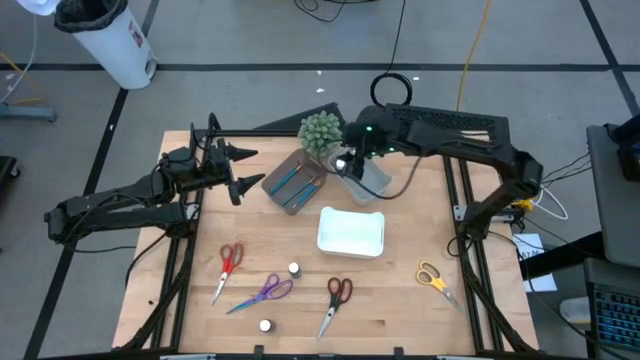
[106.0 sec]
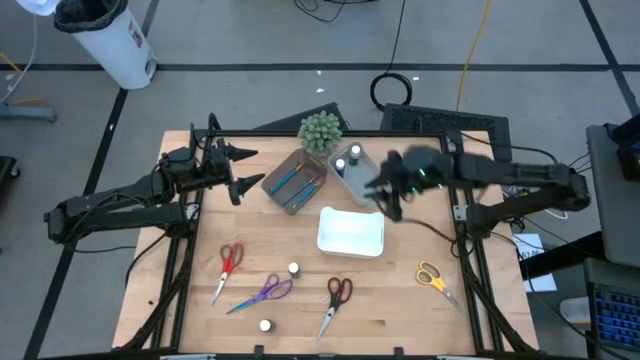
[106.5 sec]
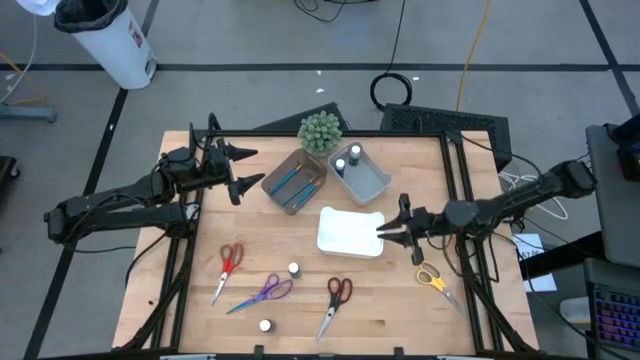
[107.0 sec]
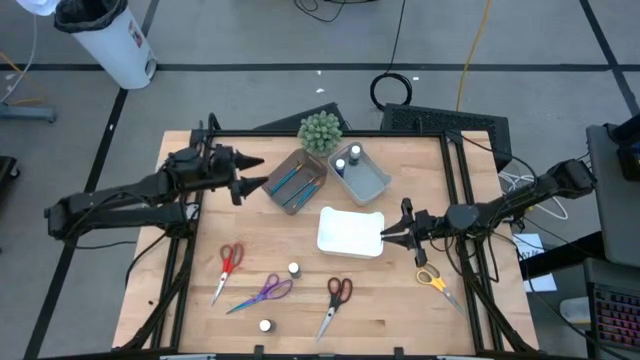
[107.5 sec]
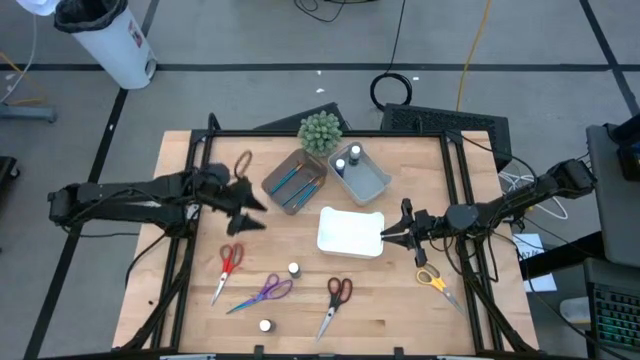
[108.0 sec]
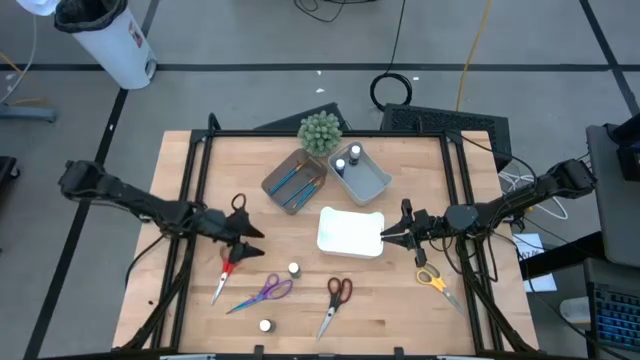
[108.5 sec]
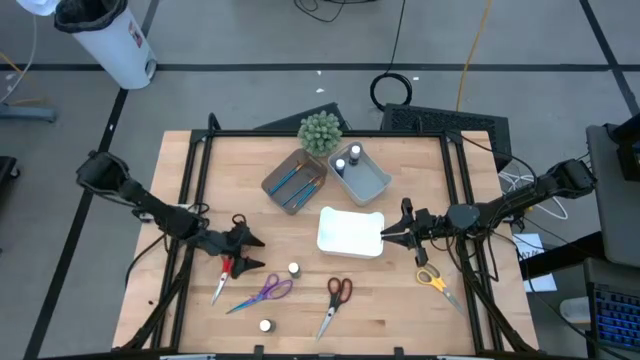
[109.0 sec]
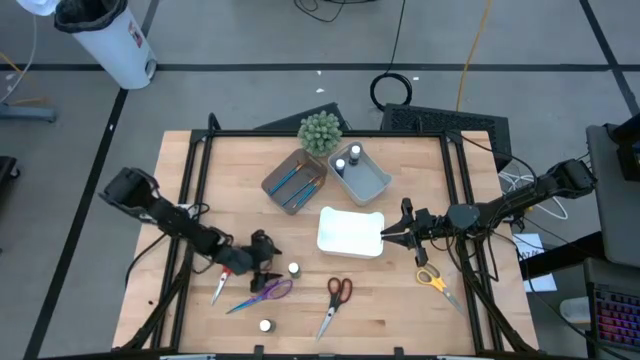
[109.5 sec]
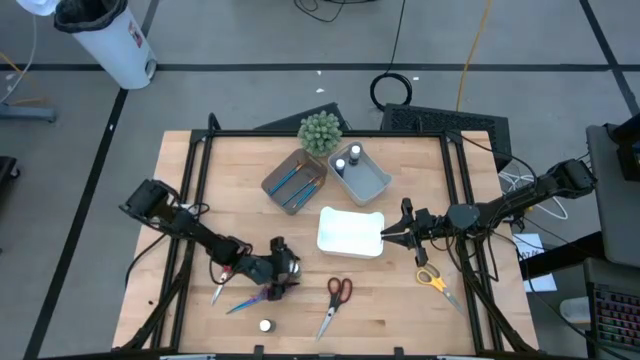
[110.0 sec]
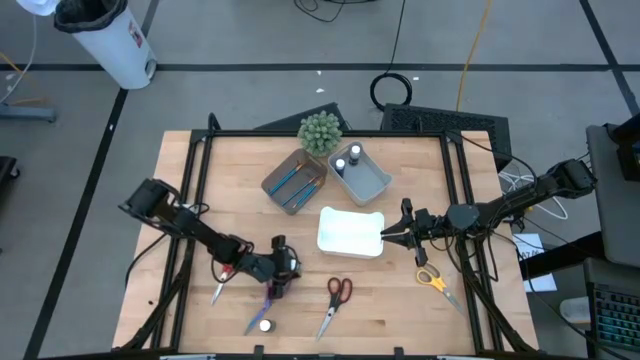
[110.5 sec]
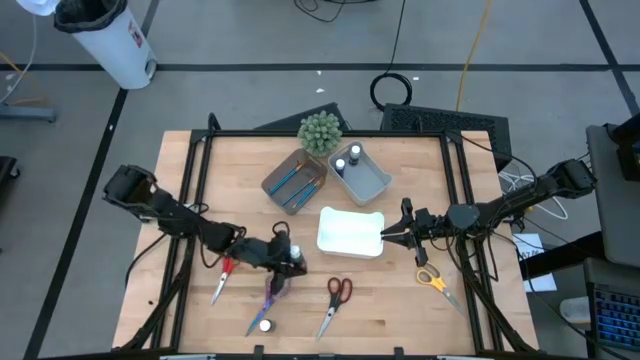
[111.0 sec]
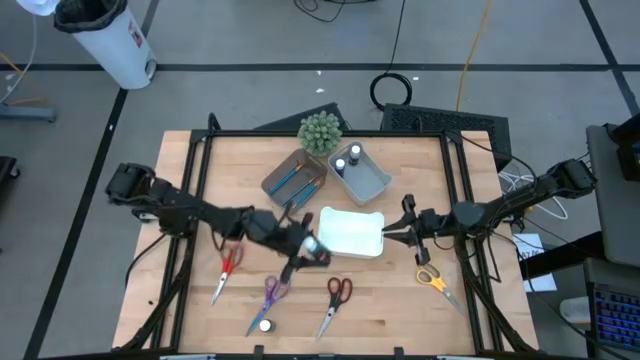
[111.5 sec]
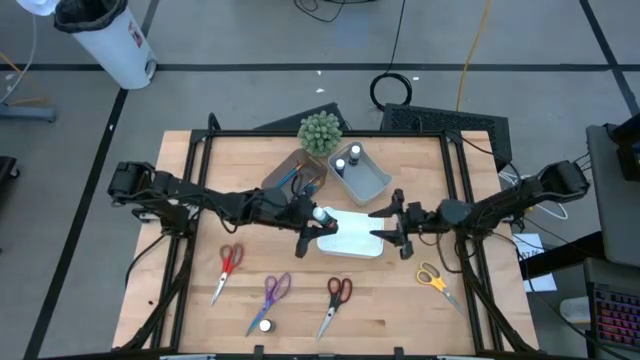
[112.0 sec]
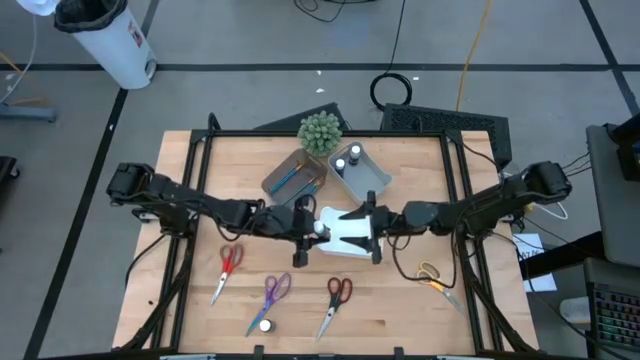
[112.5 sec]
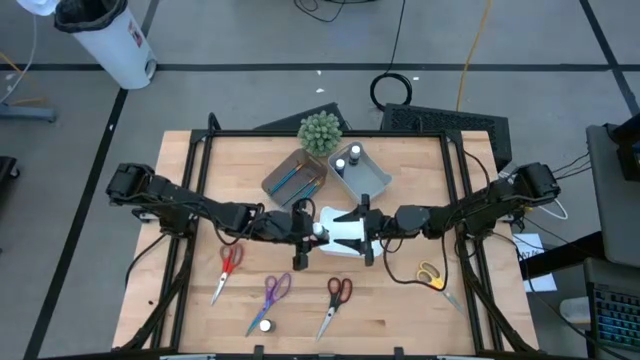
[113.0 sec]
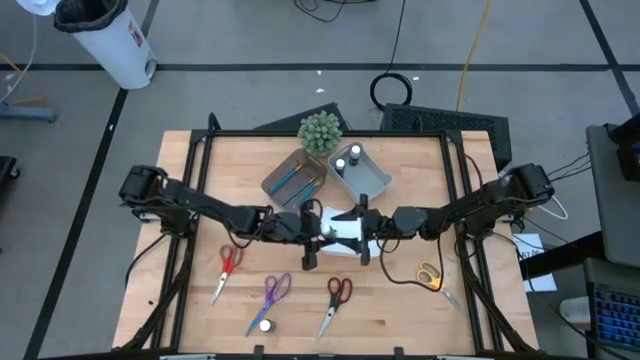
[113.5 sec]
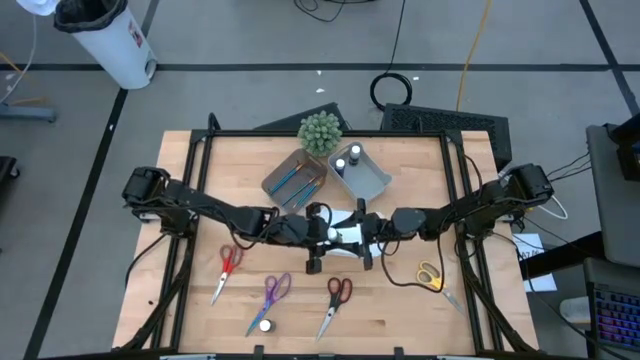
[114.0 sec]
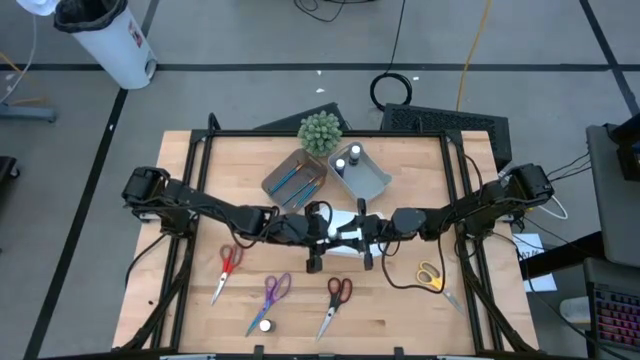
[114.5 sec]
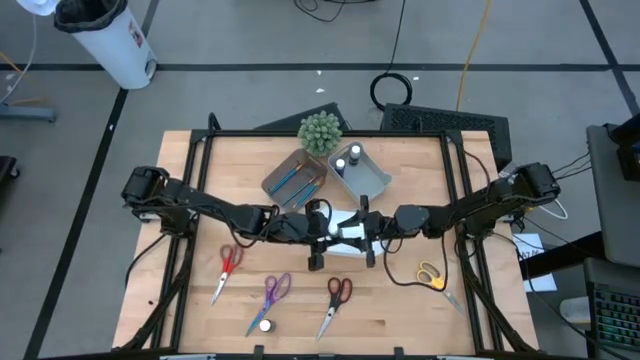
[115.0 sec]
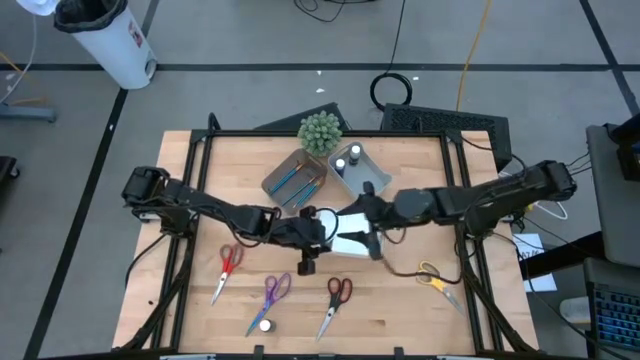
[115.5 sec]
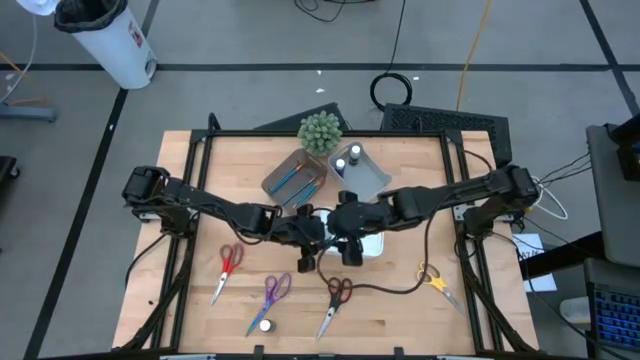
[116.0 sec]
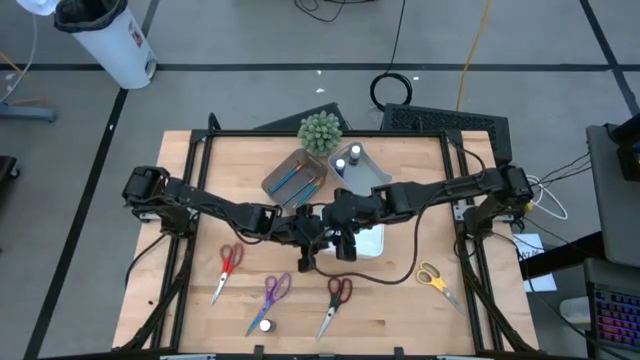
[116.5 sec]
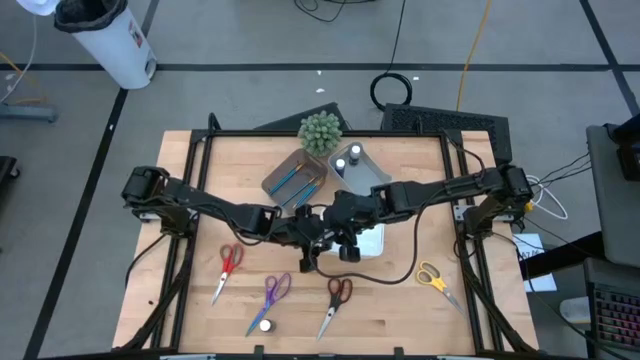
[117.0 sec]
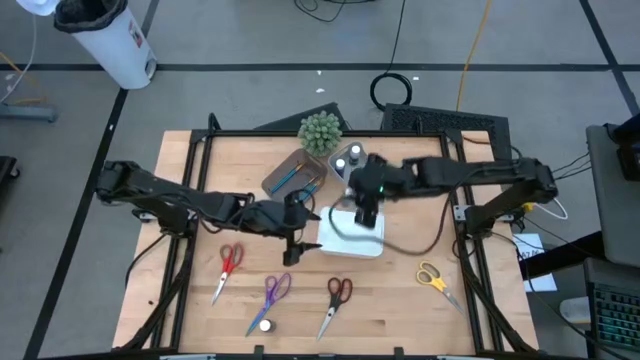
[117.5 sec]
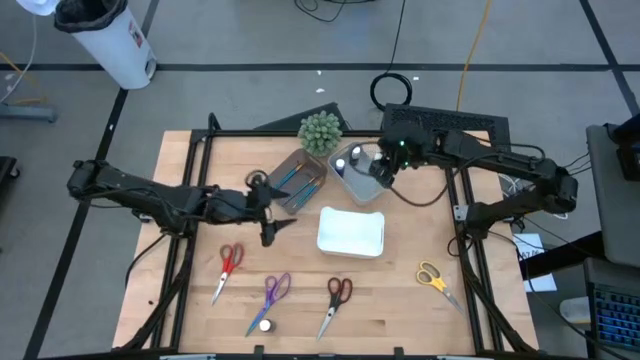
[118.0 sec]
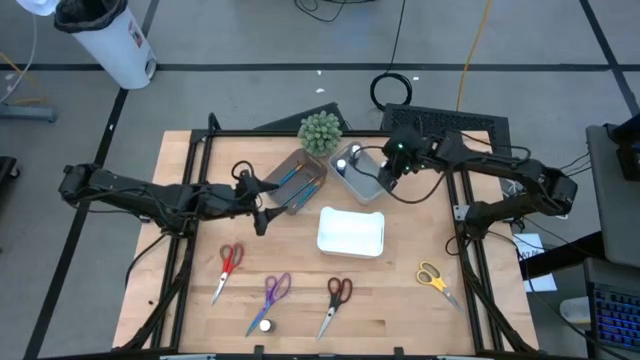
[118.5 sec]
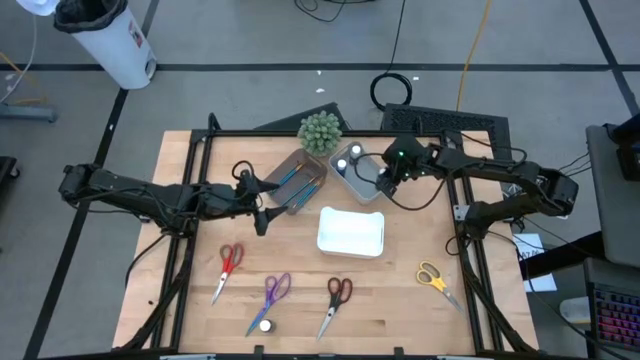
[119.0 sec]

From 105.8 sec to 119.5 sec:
Task: Pick & Place Paint Supplies
Put the green paint bottle into the gray bin

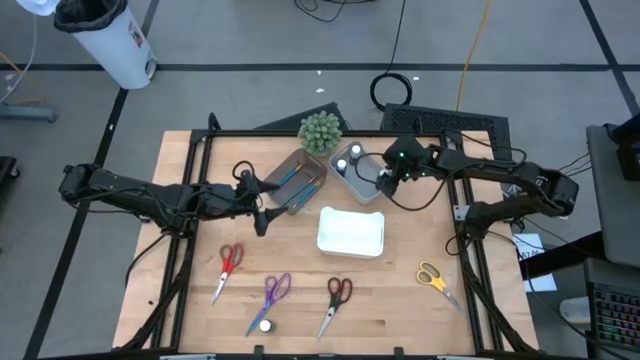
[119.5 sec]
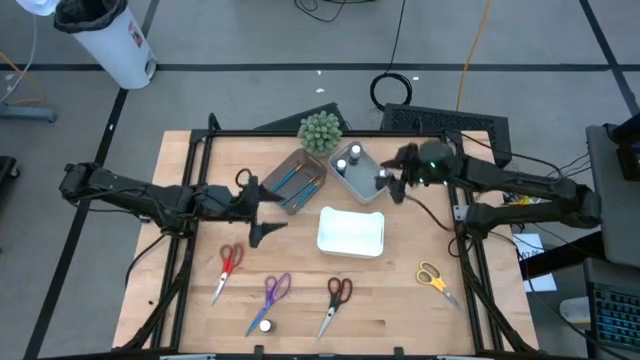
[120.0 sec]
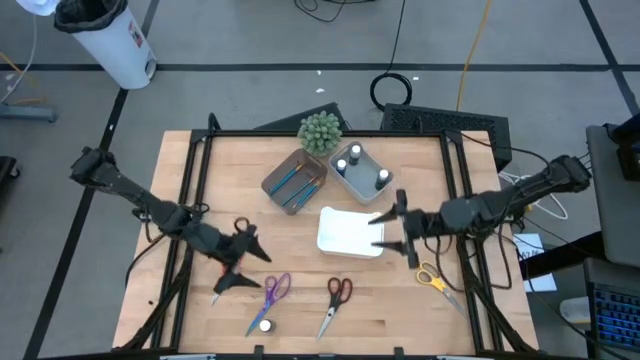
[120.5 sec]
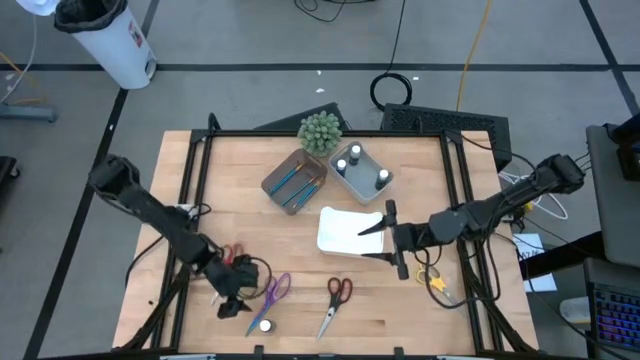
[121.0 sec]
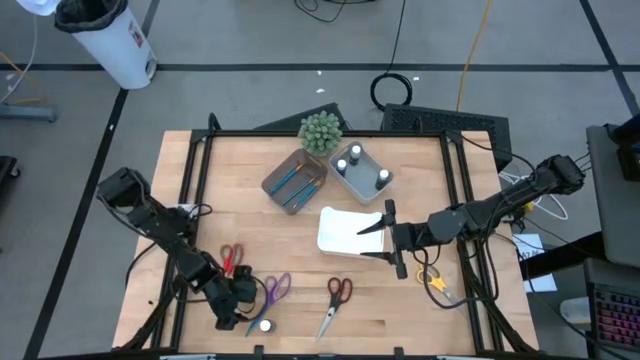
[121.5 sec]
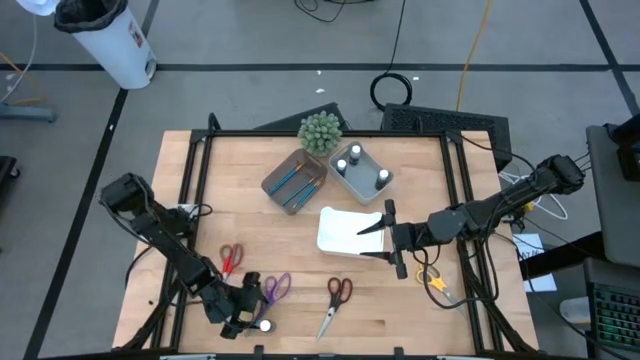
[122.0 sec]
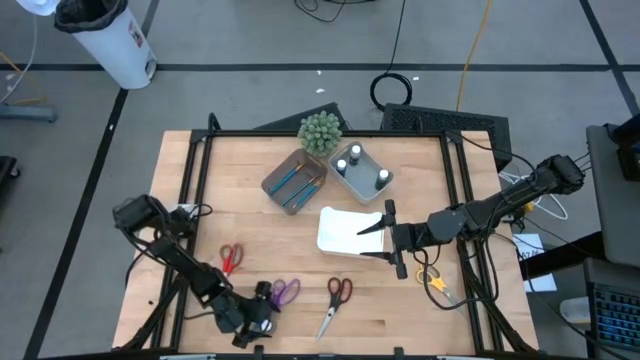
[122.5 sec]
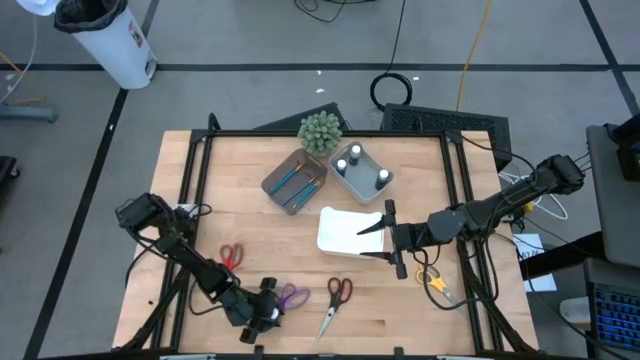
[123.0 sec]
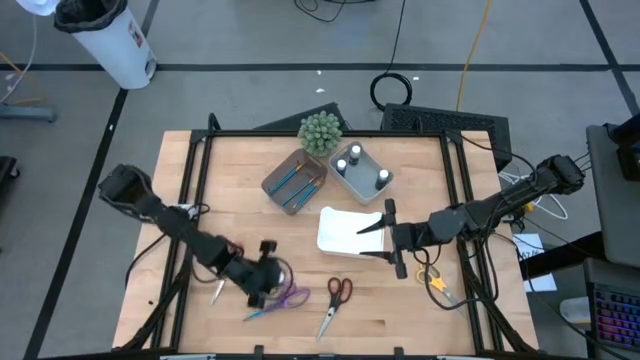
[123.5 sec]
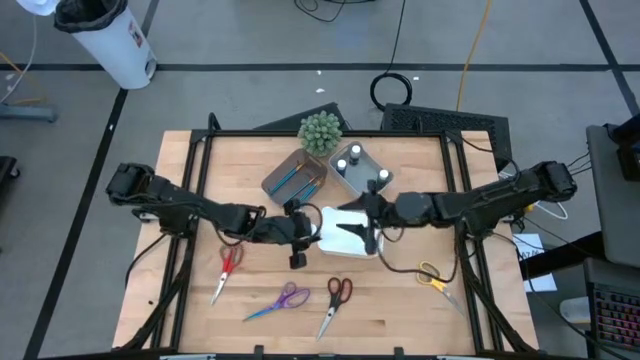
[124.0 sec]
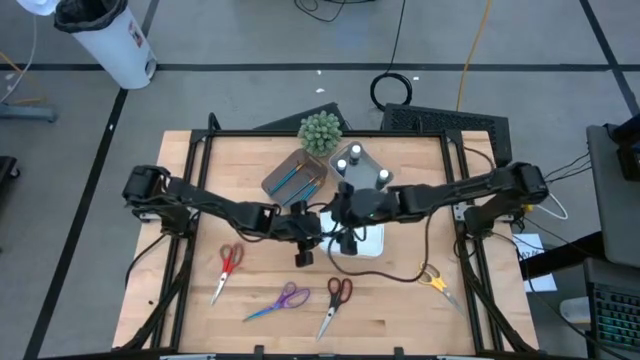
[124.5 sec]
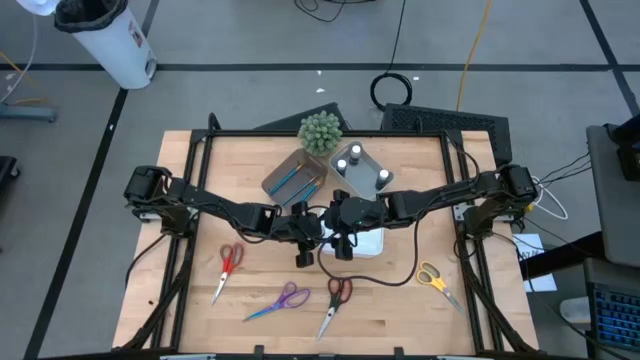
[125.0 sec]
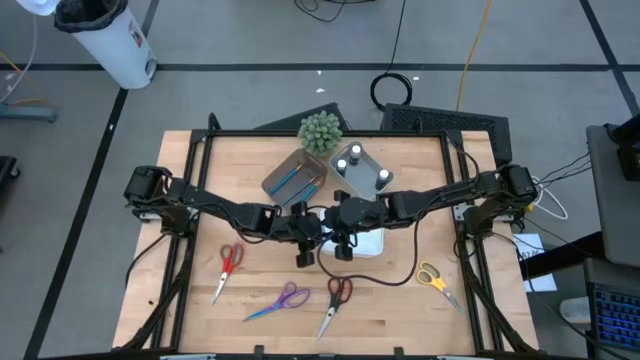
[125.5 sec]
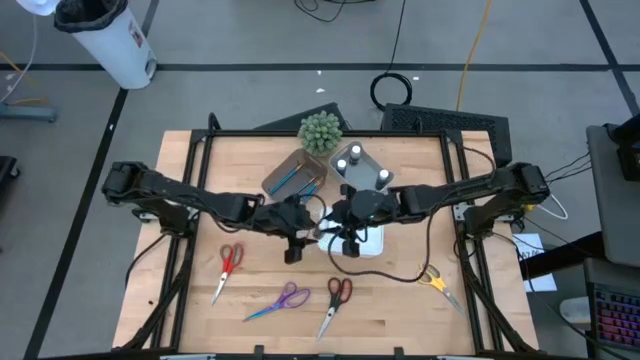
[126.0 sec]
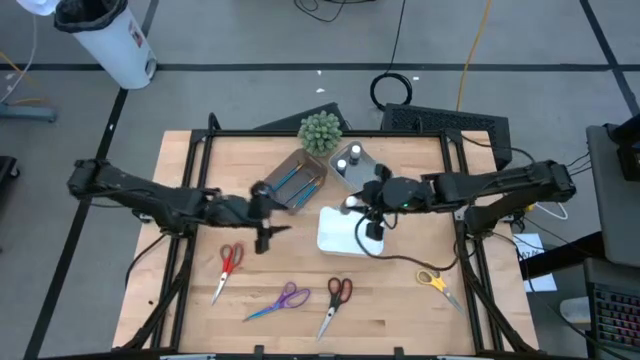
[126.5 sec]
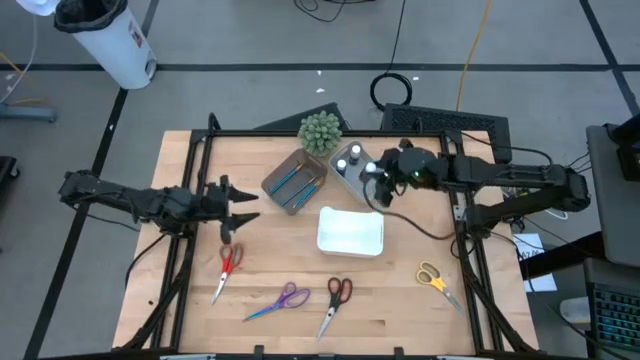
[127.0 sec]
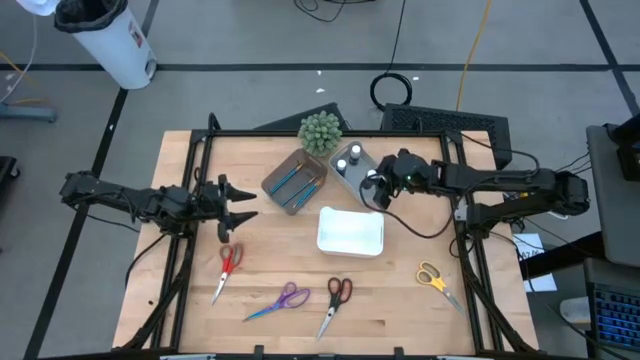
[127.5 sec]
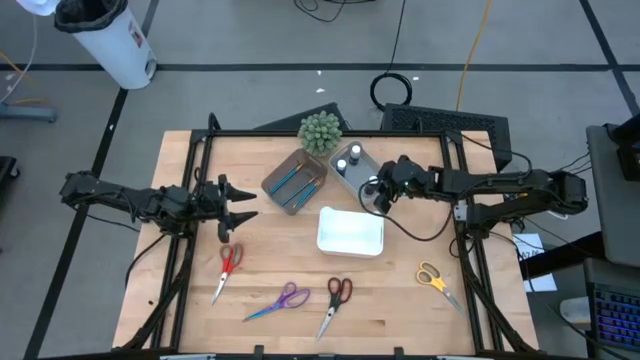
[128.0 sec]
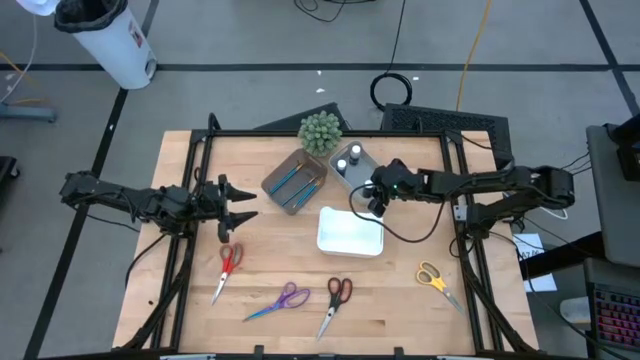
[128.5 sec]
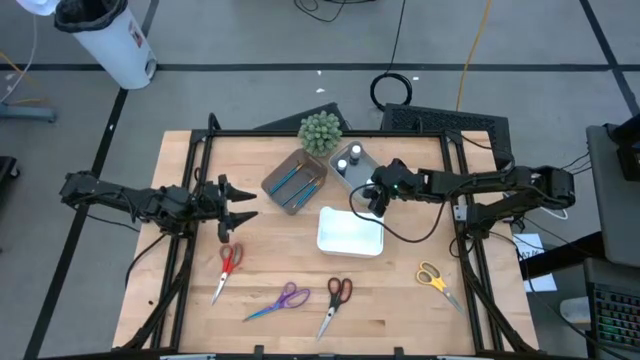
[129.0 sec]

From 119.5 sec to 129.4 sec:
Put the brown paint bottle into the gray bin
